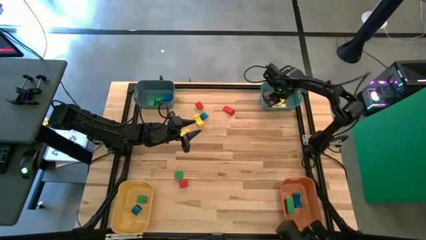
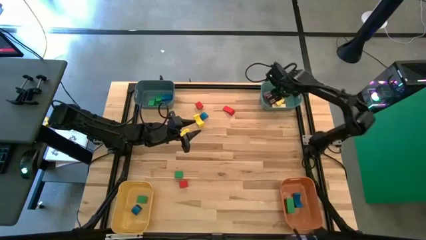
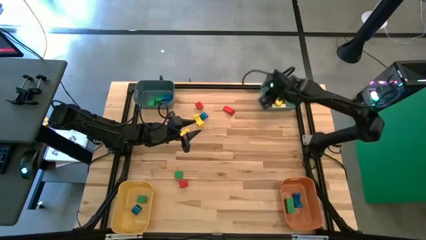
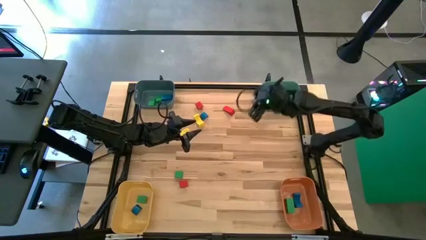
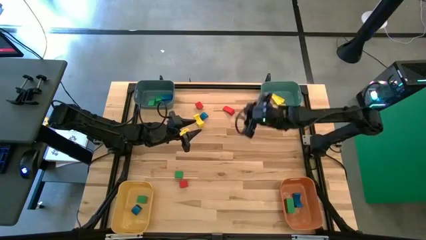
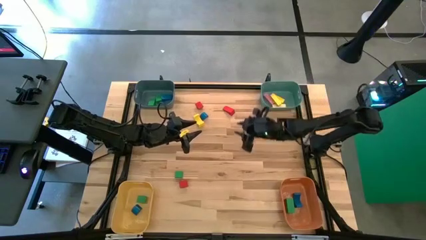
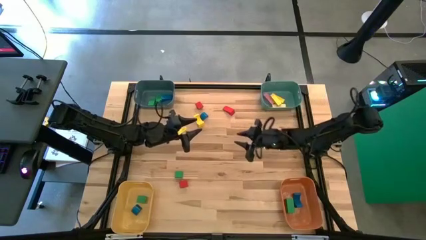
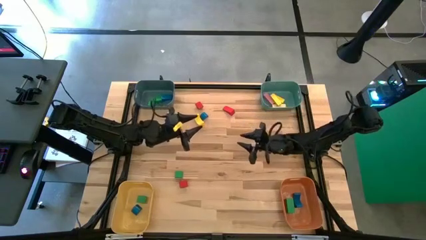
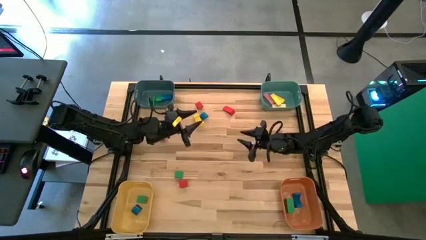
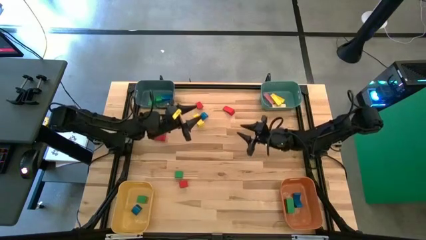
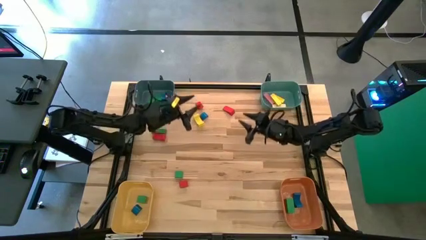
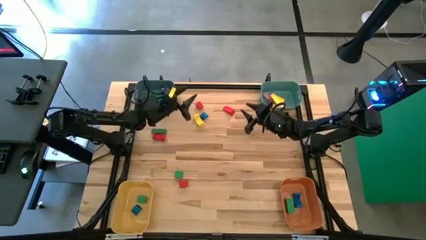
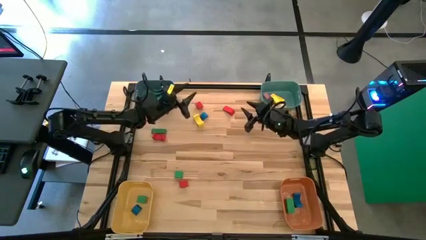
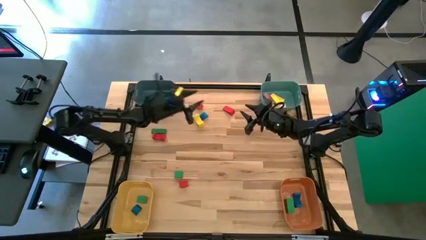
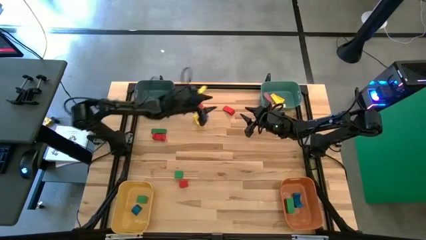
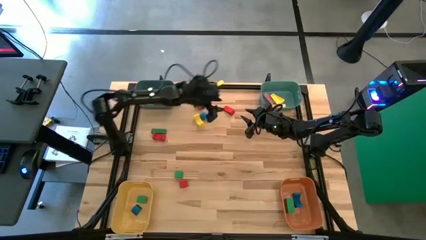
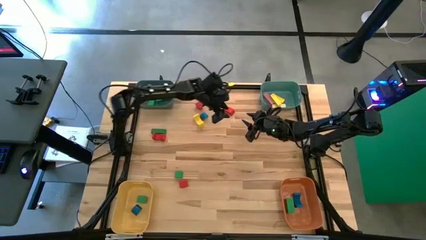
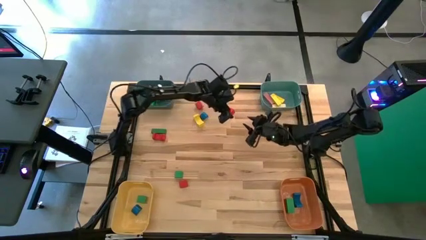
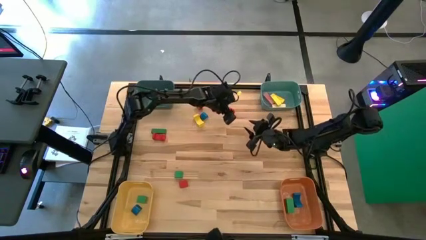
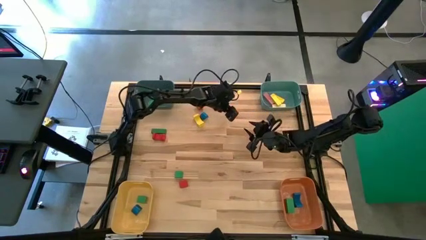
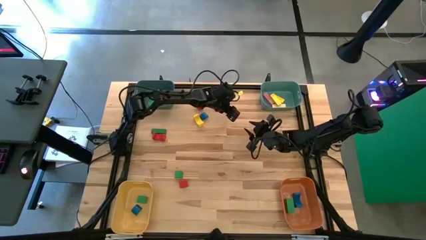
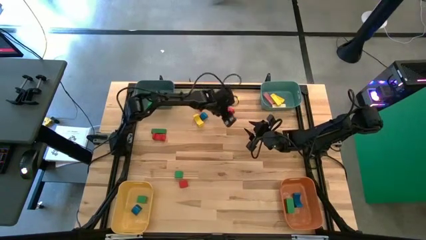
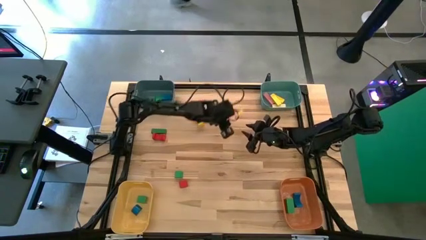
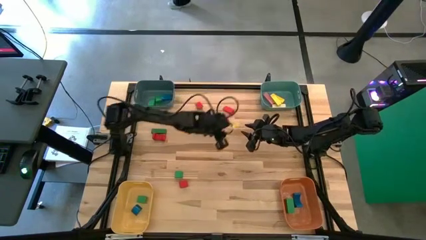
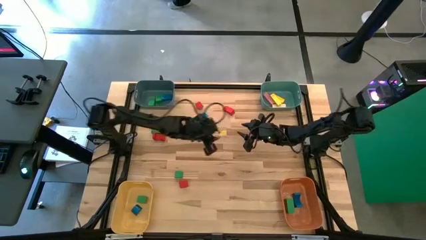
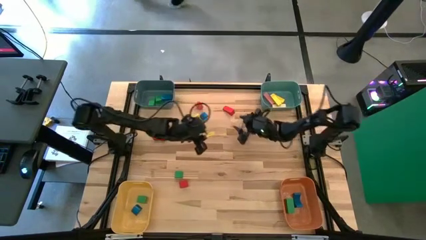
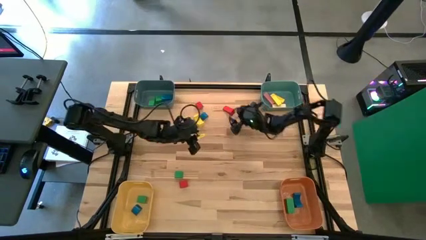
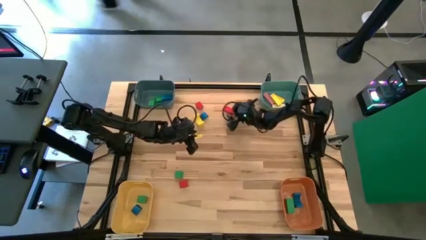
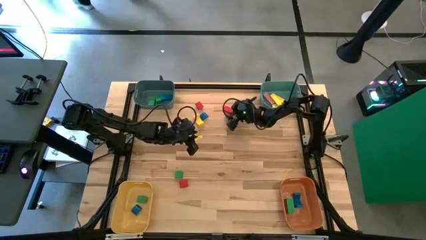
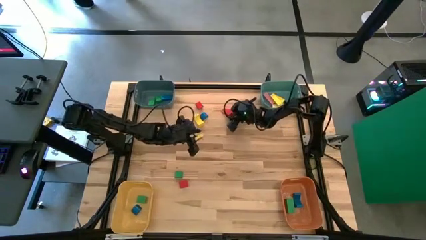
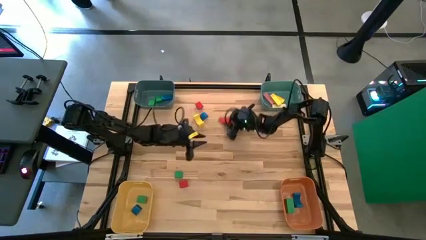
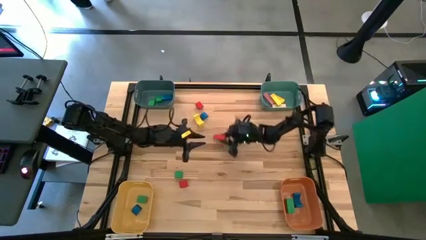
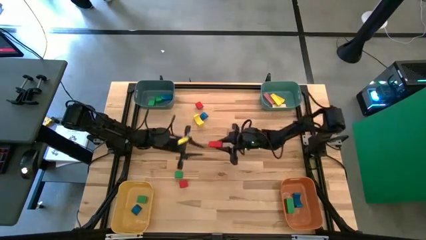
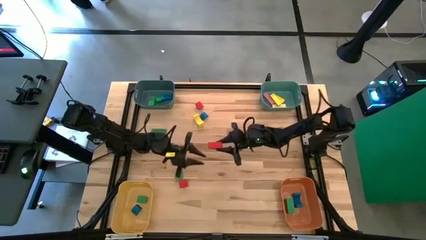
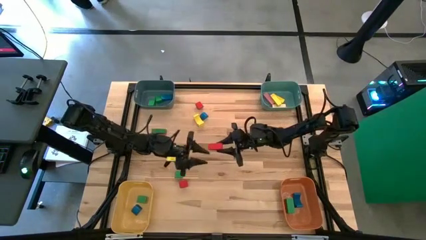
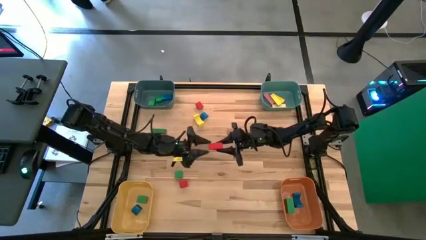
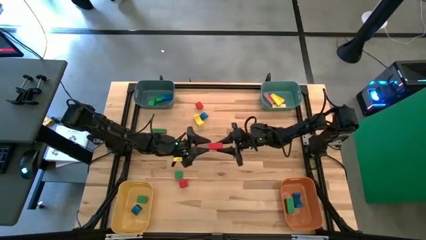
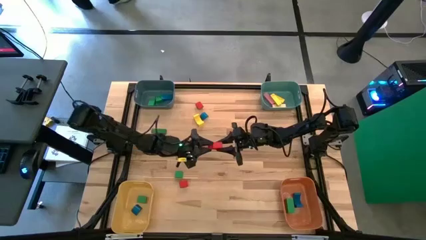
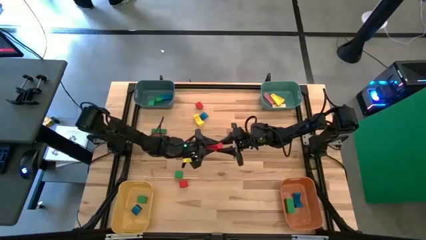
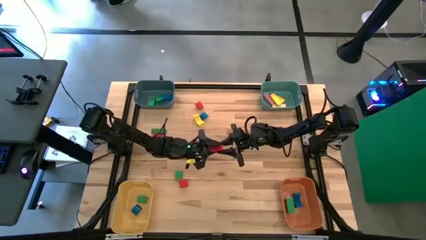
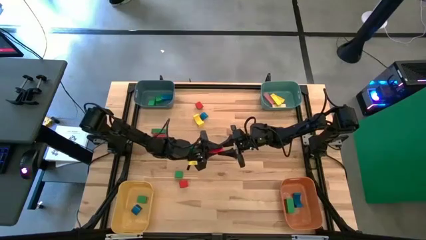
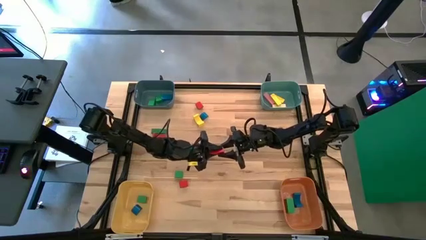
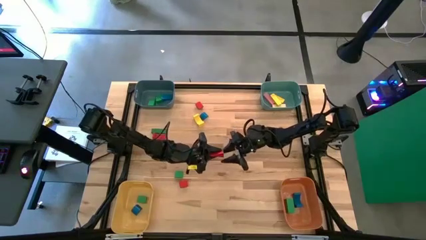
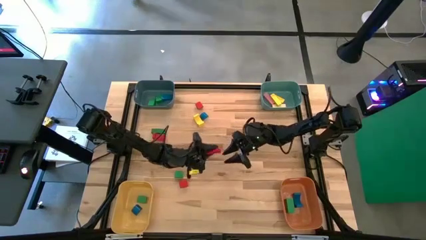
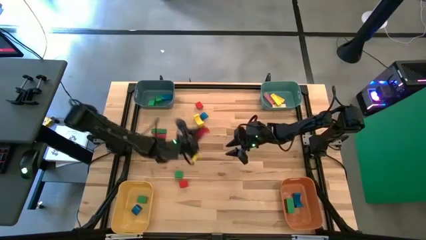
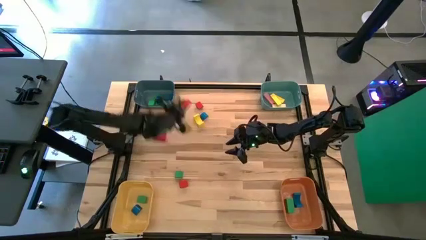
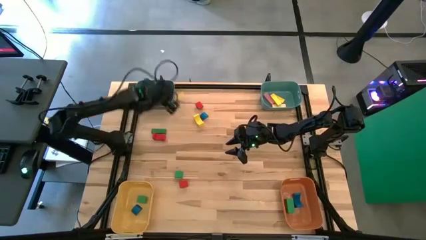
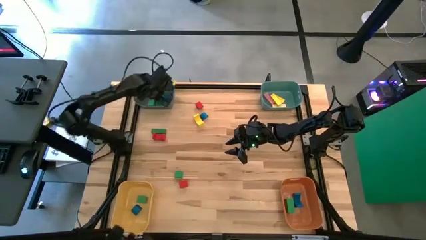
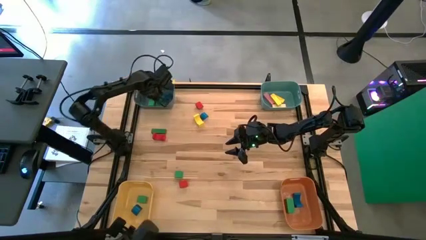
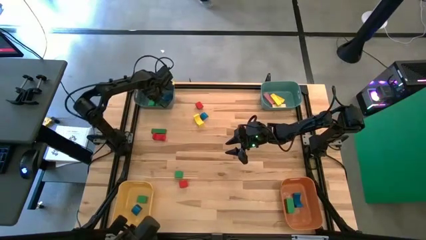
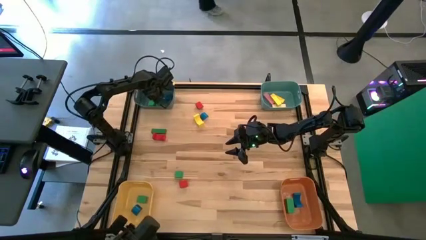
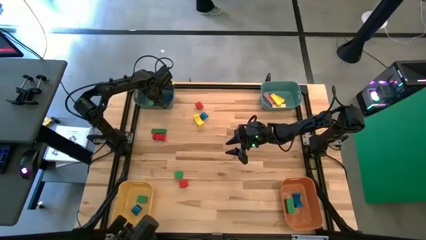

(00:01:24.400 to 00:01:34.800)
Task: Sort blocks by size
Put the red triangular block into the blue bin

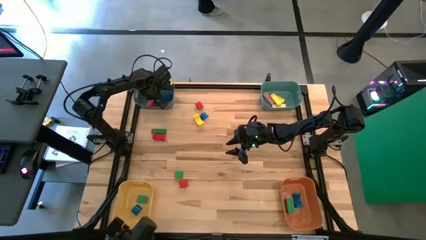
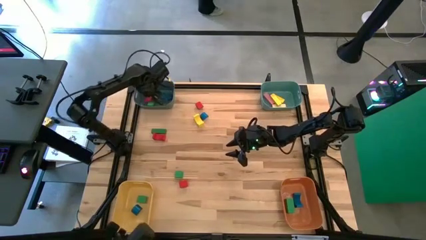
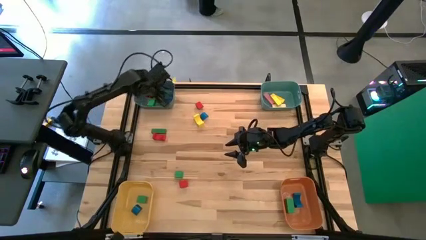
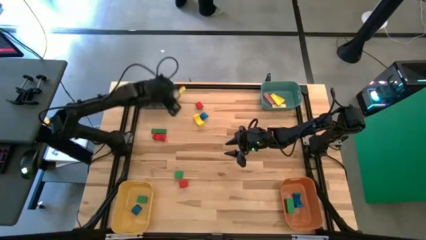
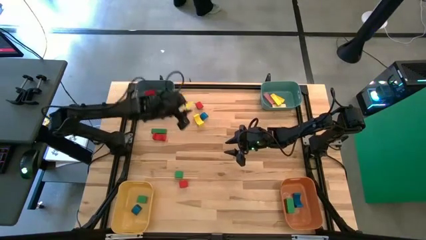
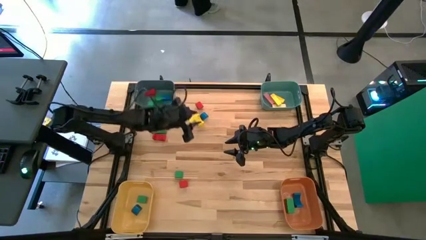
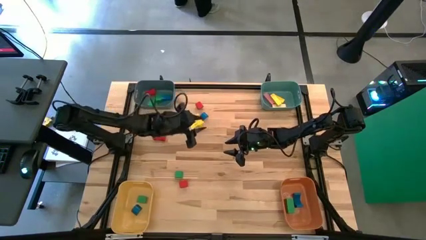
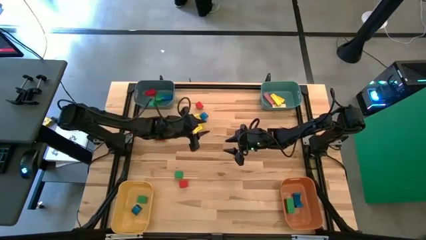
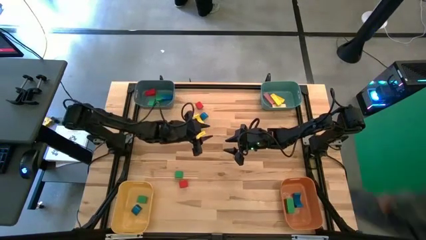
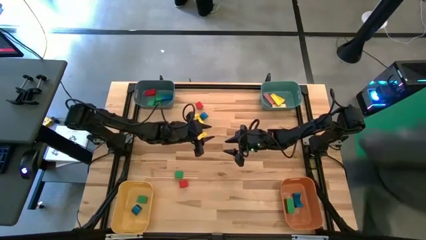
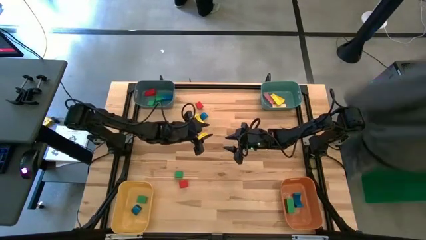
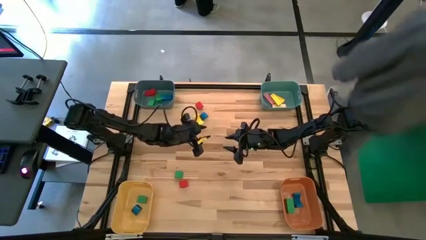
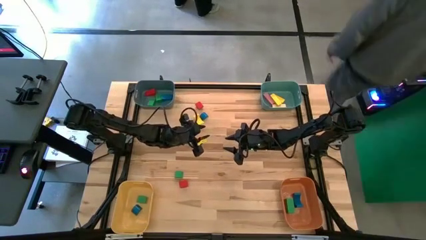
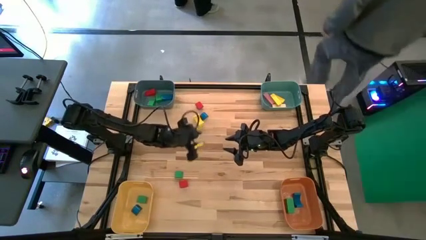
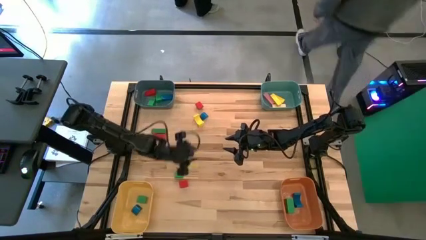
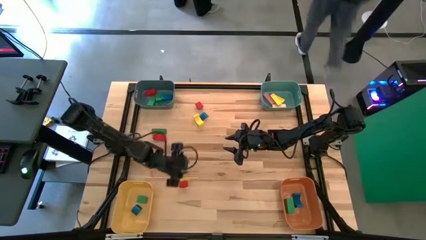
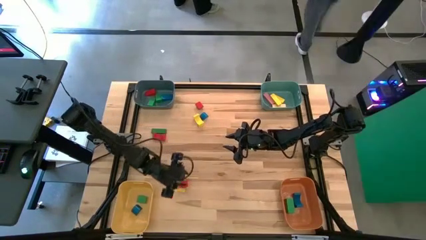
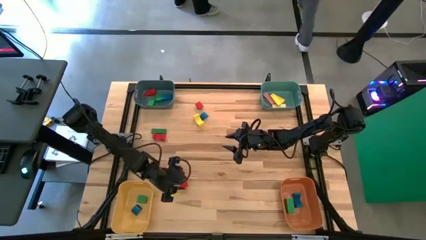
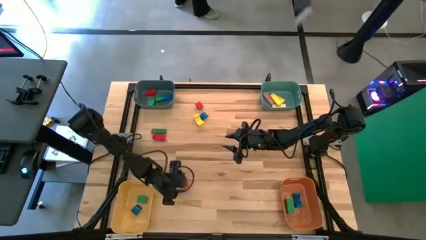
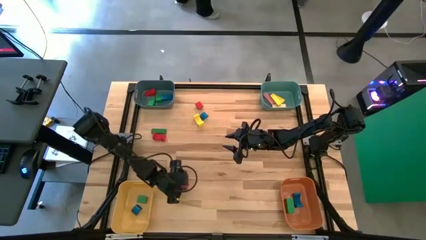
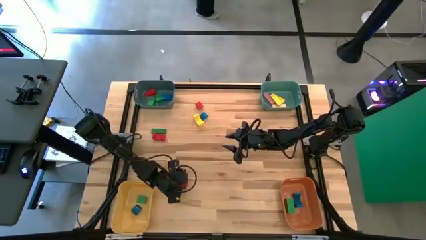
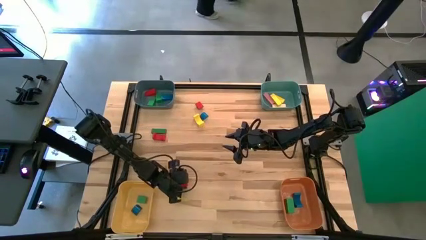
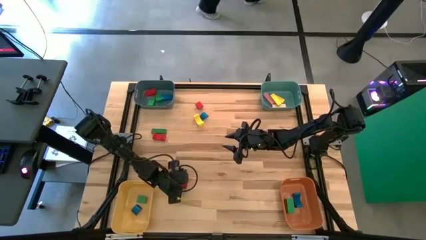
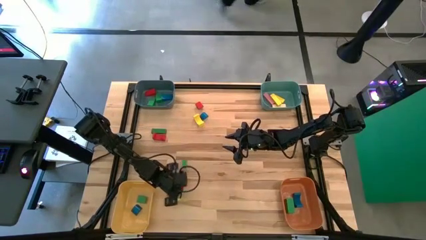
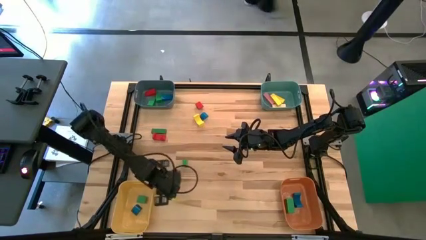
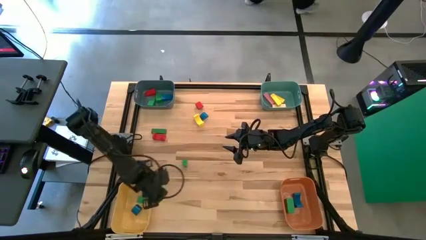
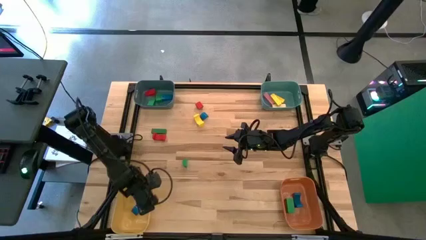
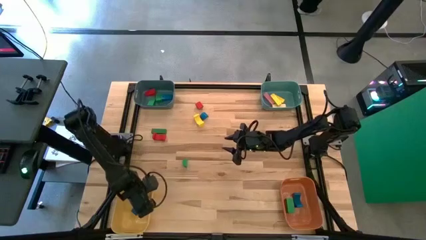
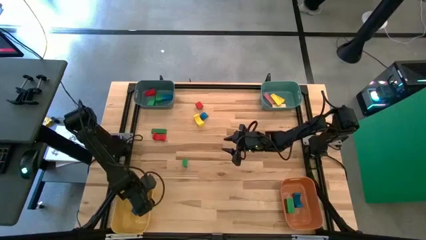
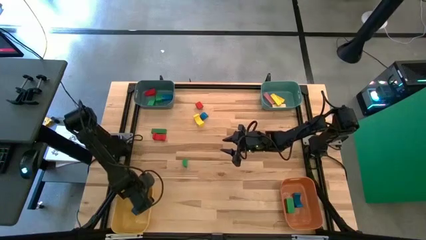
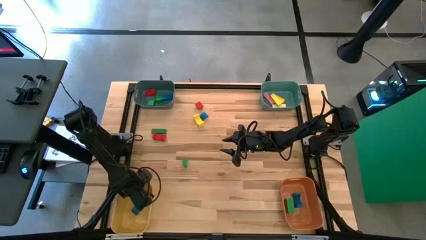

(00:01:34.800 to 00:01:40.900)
Put the red half-circle block into the blue bin
